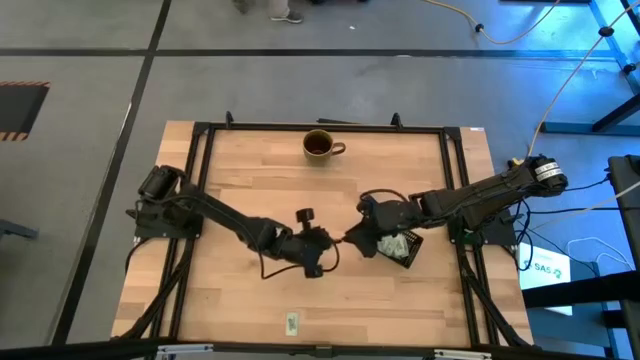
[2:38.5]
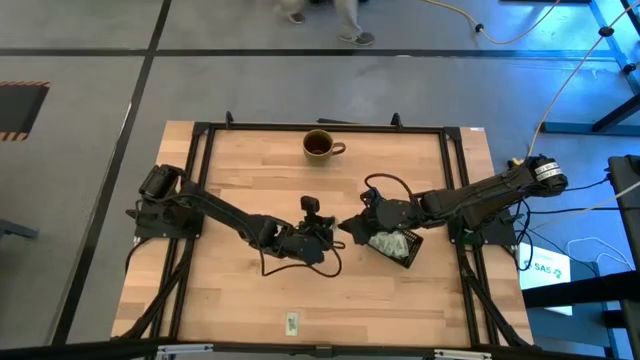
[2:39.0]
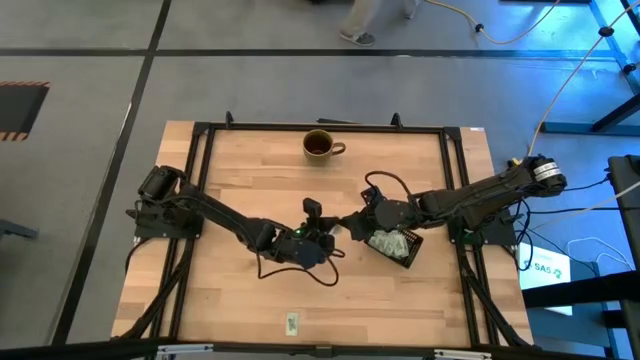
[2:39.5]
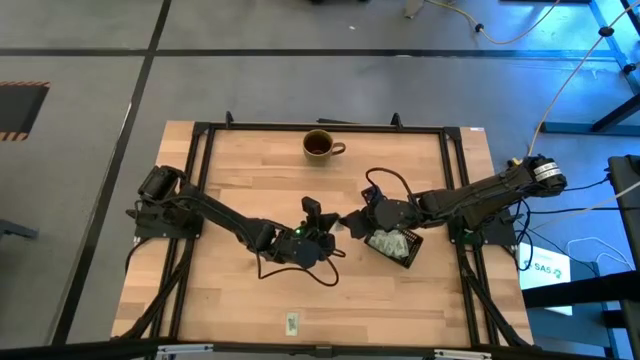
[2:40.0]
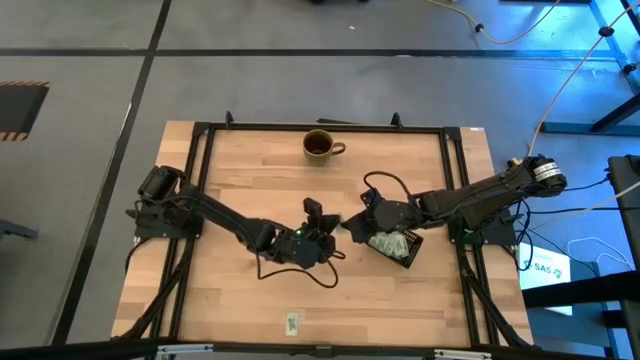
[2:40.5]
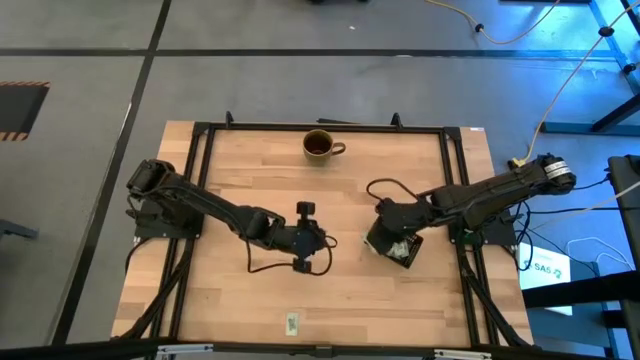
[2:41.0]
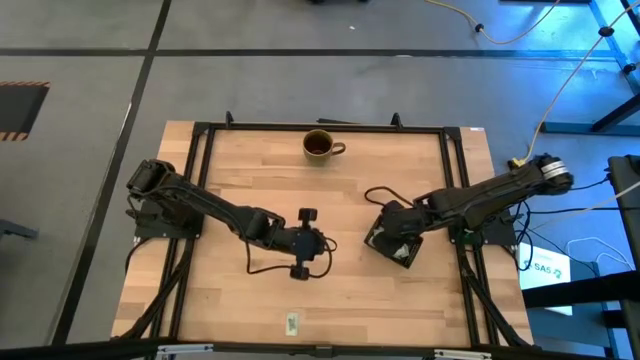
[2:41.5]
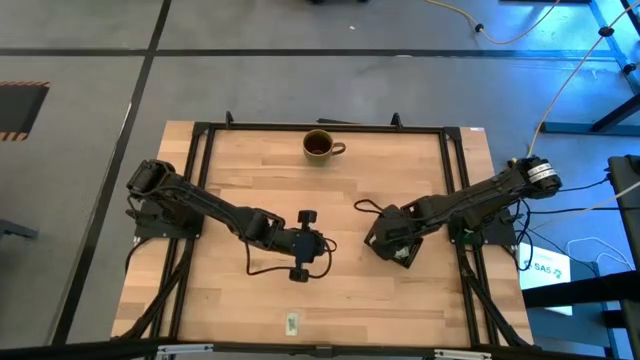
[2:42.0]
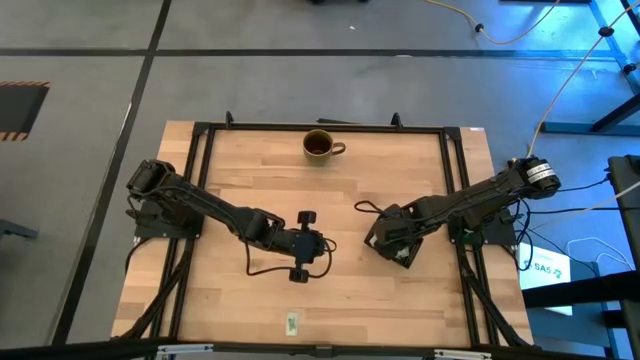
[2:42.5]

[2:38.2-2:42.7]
Task: Pick and place Stevia / Truvia into bins
Put the stevia packet into the black bin

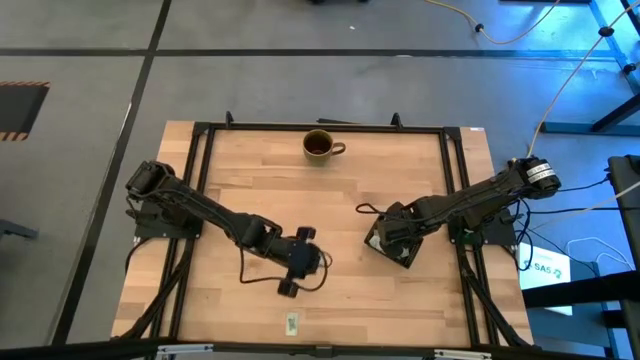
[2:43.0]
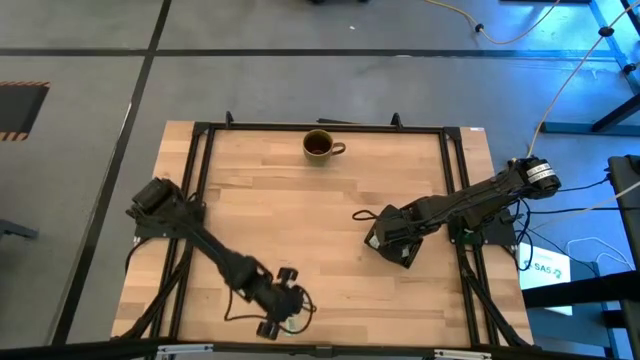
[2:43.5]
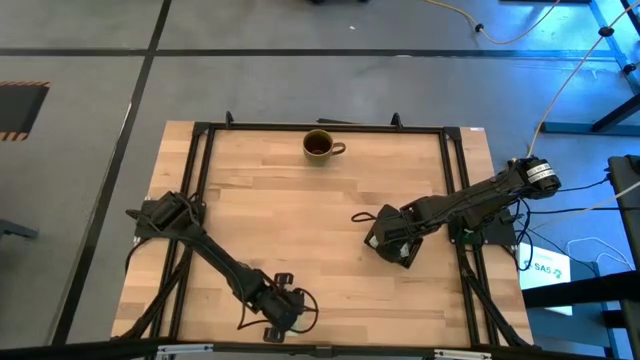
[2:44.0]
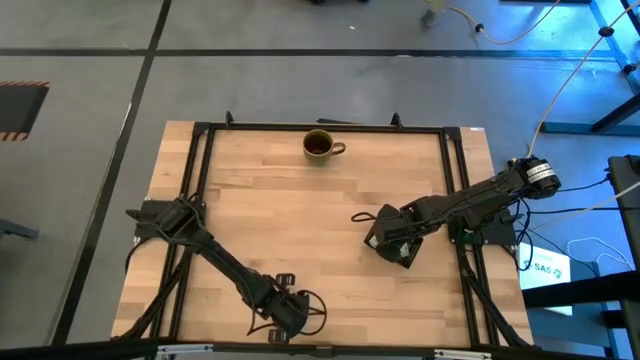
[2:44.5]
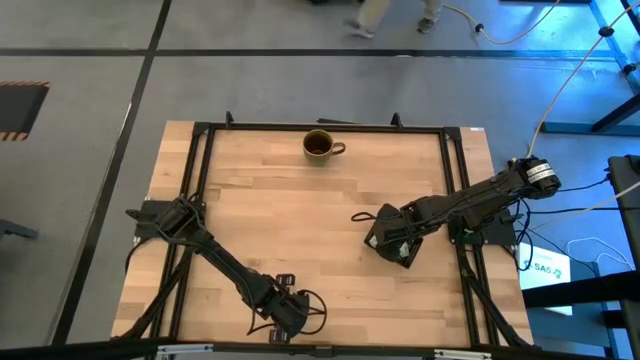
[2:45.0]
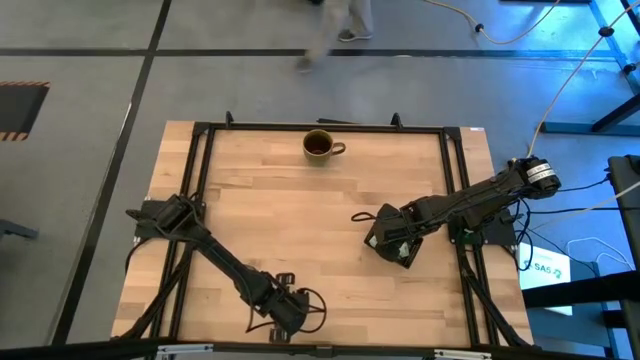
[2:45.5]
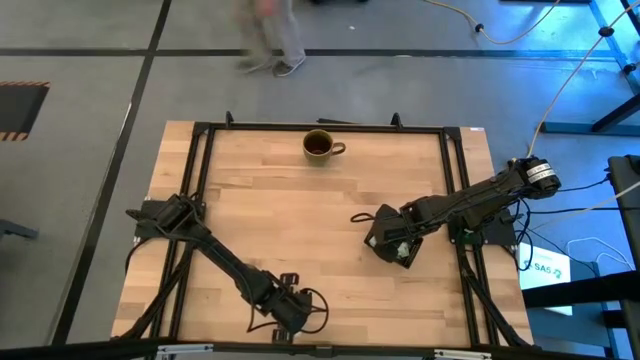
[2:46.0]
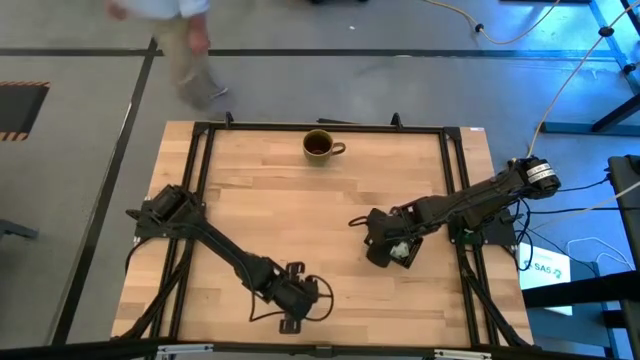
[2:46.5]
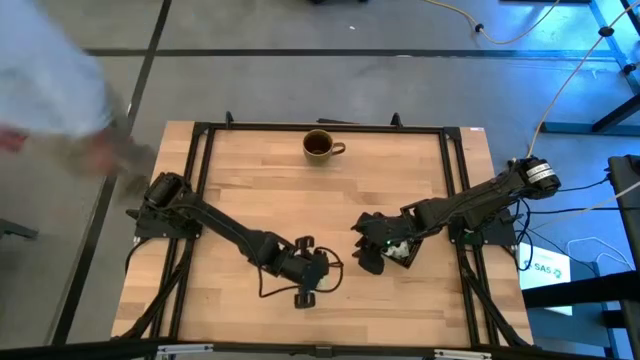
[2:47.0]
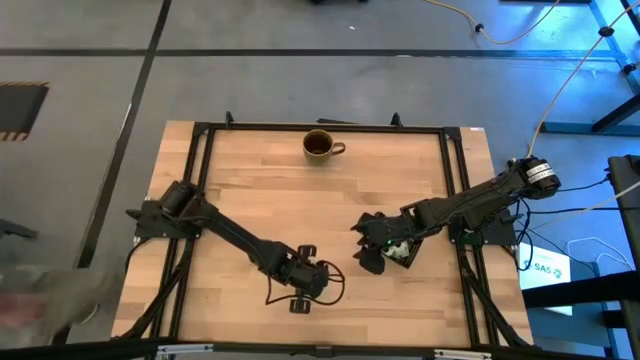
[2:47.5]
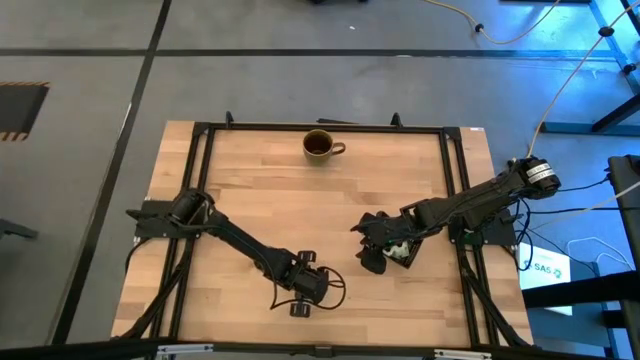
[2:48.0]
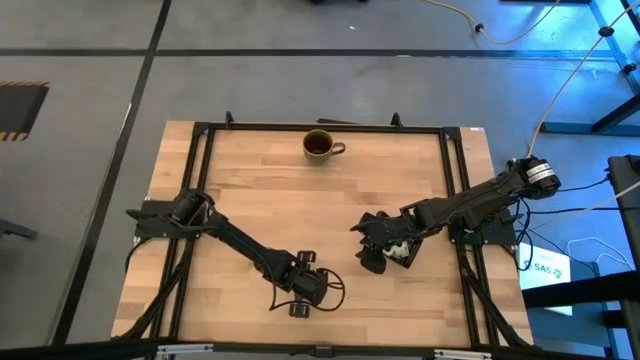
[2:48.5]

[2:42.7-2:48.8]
Put the stevia packet into the black bin

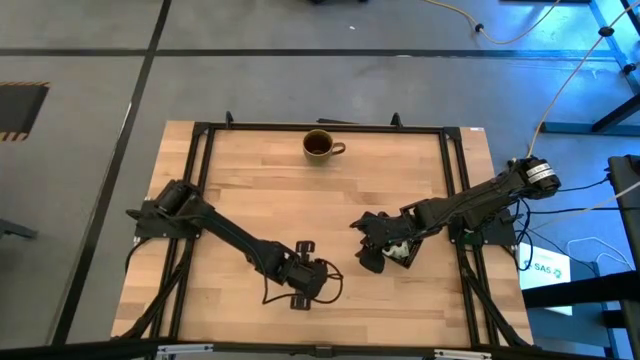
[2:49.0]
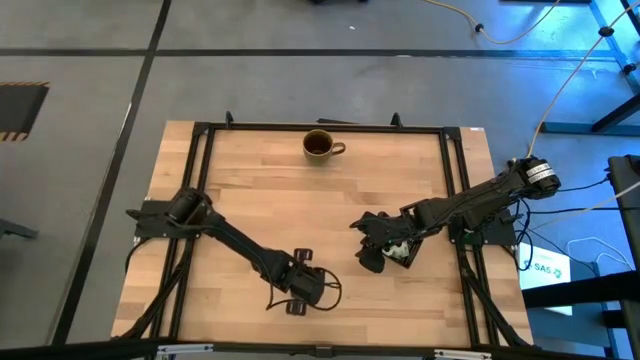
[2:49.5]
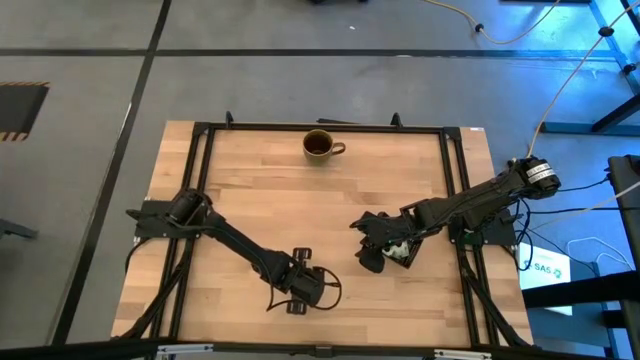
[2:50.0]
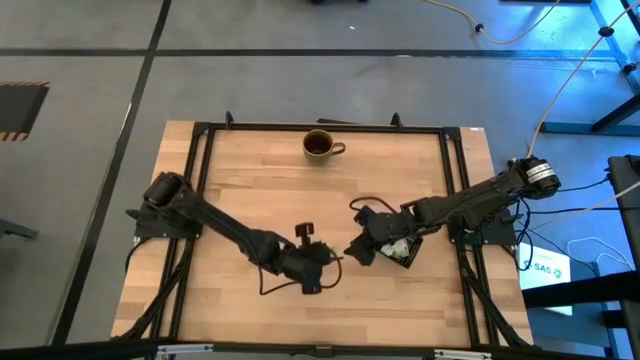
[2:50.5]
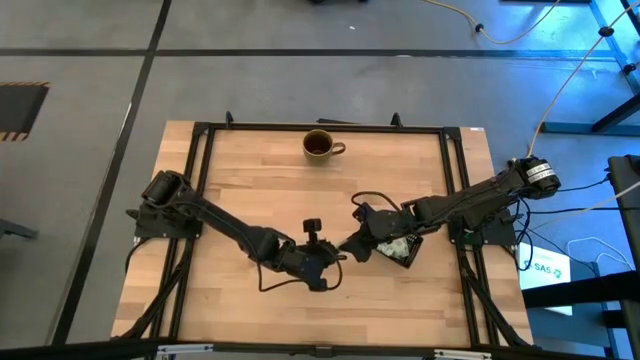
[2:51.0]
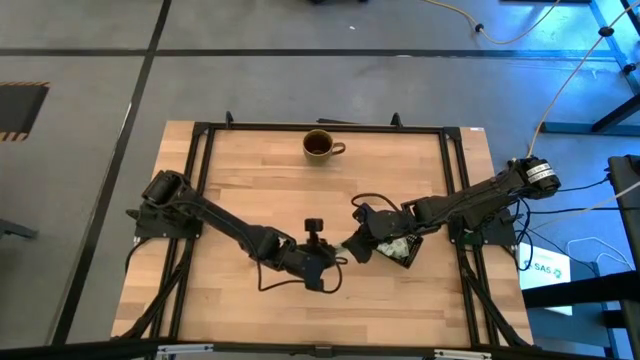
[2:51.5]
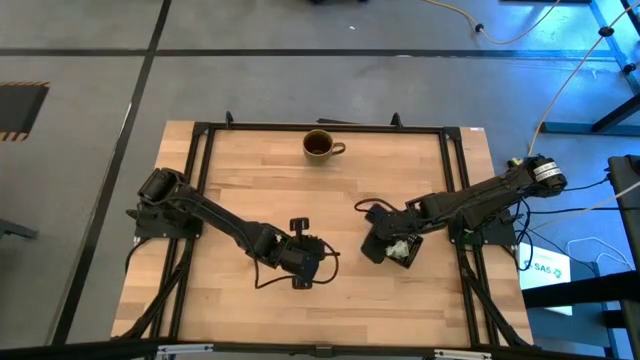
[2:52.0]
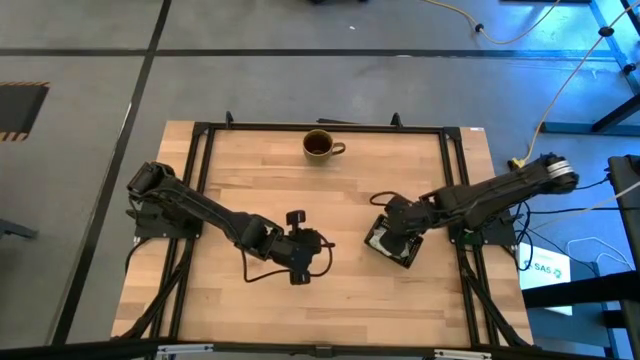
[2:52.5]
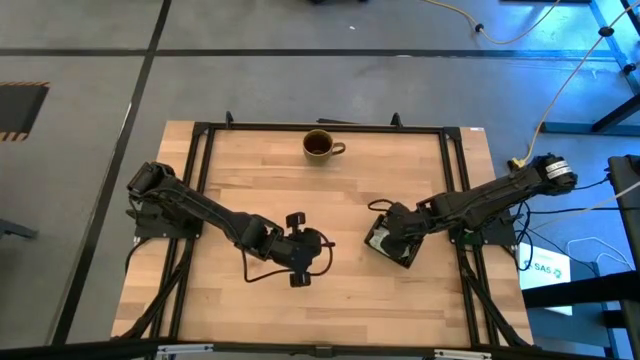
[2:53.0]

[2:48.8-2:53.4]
Put the stevia packet into the black bin

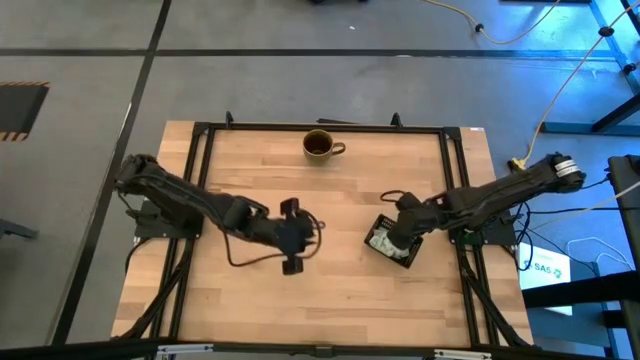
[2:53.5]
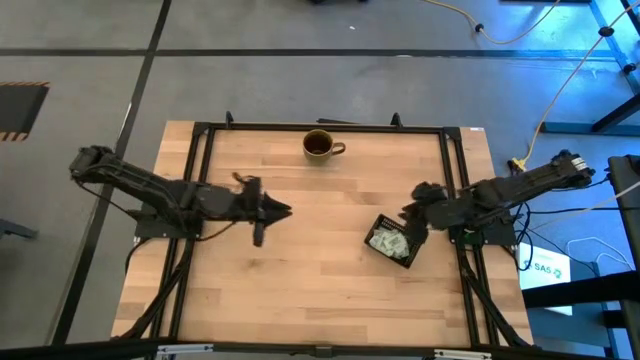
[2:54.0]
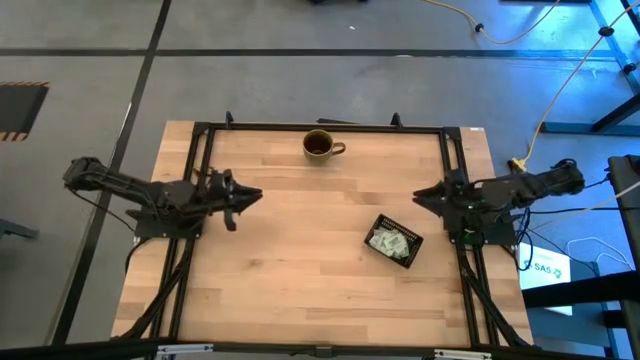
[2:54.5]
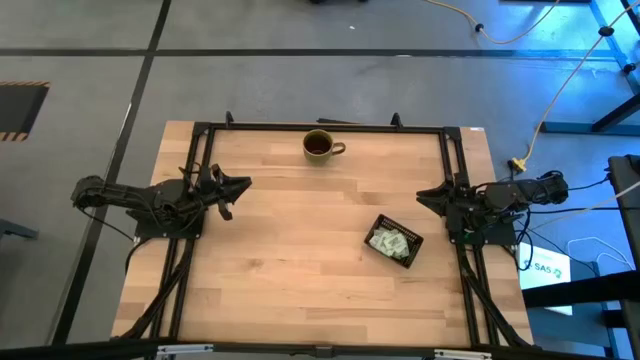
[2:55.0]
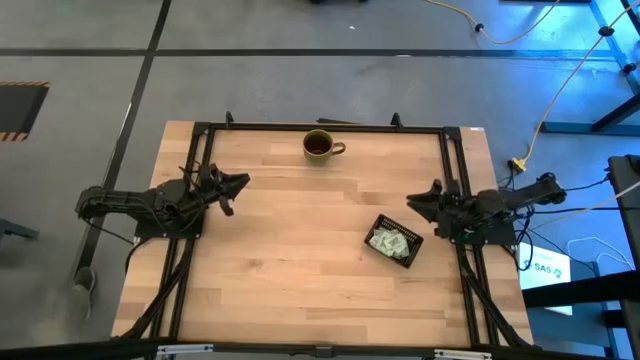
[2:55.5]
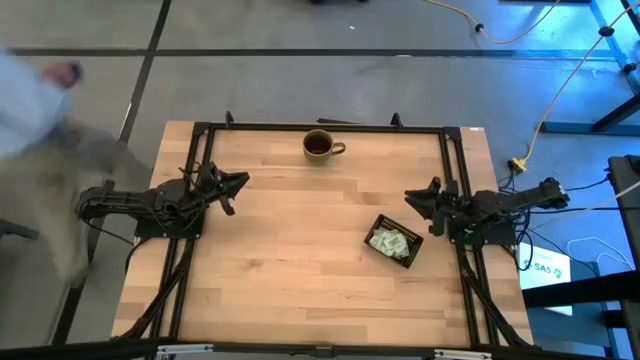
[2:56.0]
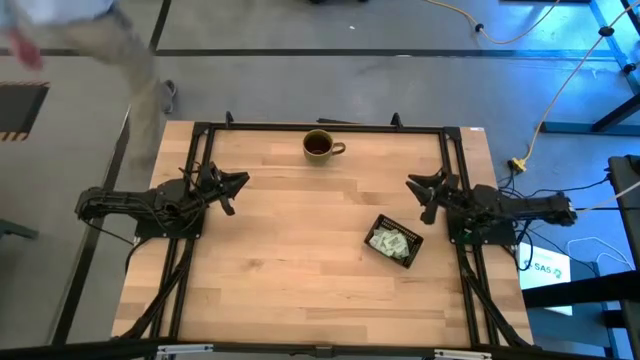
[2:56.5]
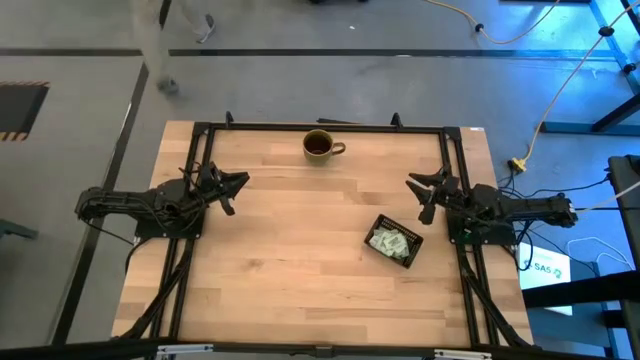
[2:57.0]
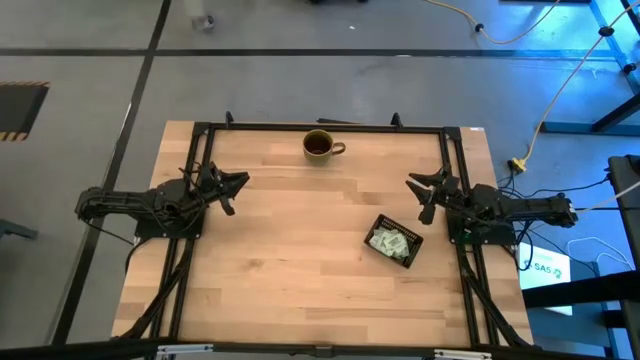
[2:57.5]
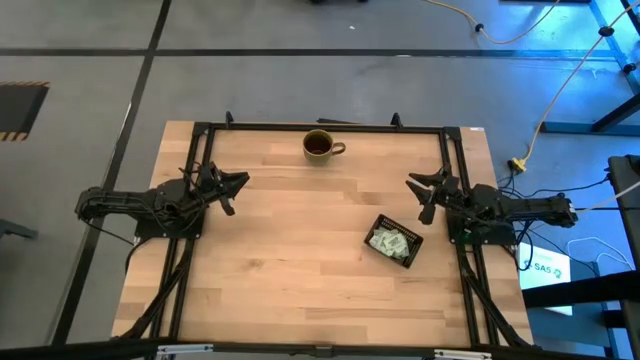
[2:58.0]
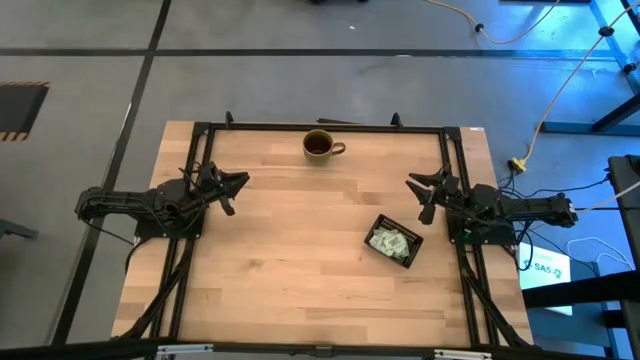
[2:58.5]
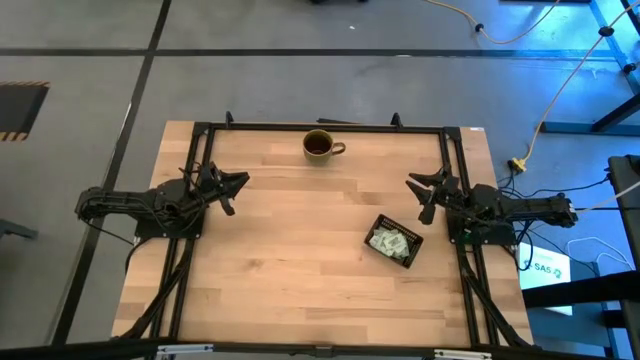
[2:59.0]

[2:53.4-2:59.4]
Return to Home Position
